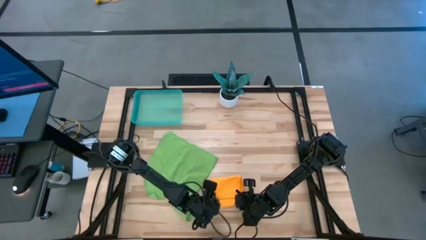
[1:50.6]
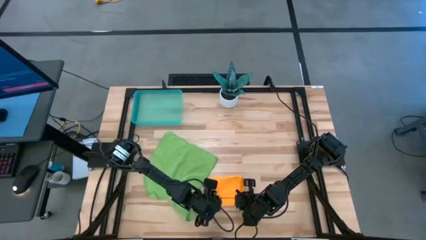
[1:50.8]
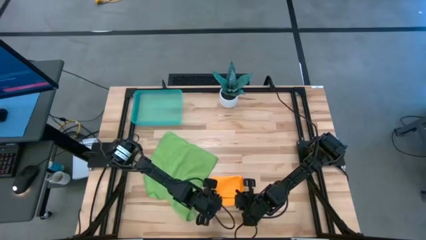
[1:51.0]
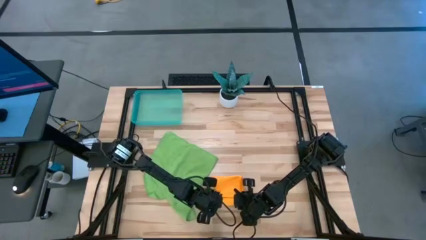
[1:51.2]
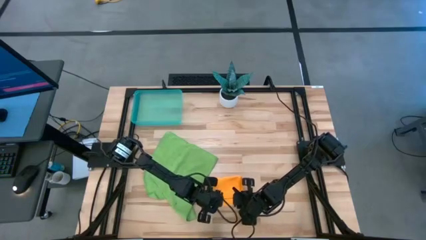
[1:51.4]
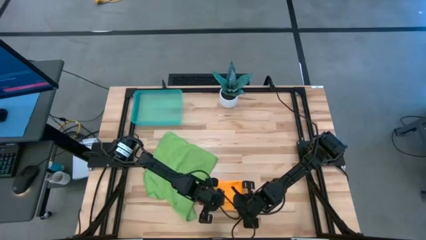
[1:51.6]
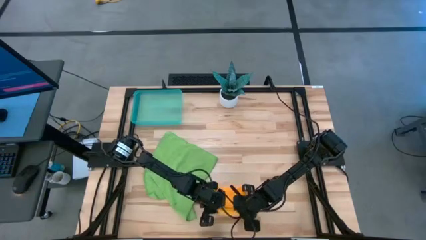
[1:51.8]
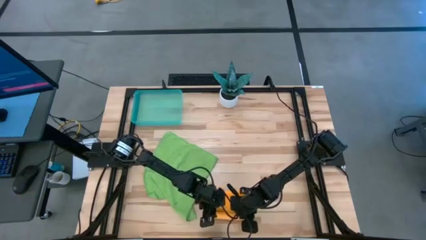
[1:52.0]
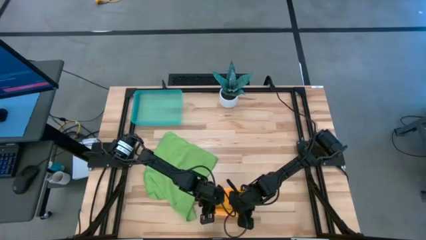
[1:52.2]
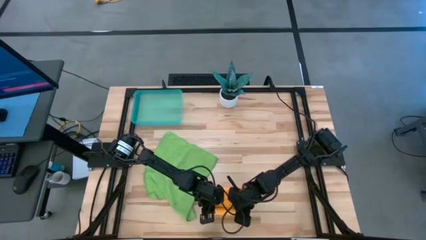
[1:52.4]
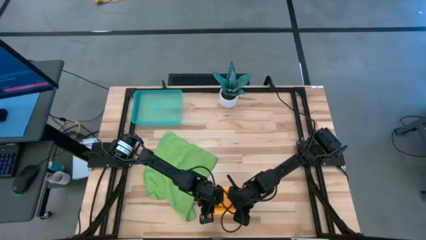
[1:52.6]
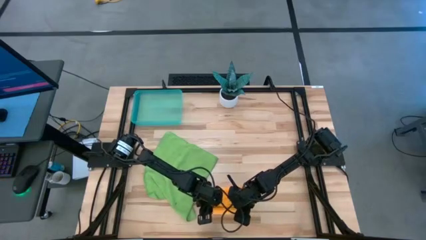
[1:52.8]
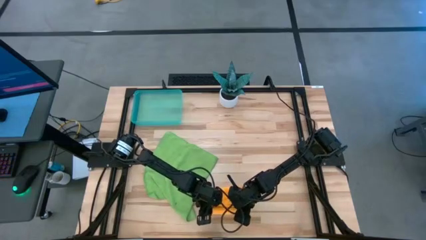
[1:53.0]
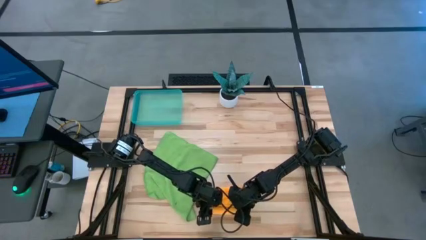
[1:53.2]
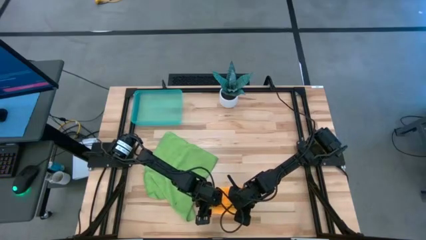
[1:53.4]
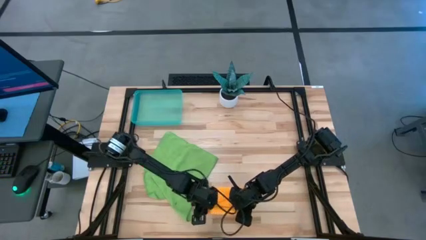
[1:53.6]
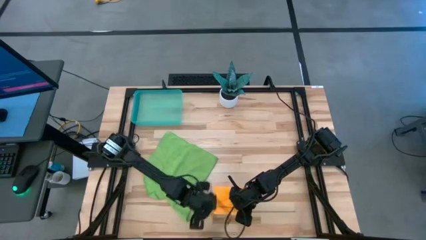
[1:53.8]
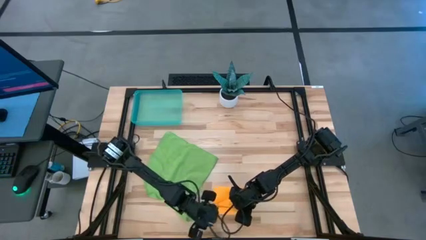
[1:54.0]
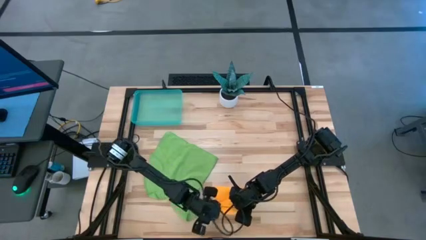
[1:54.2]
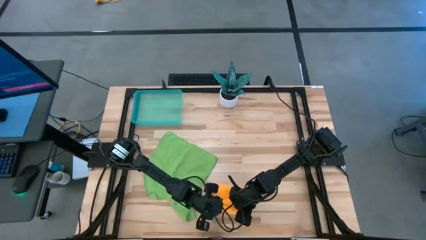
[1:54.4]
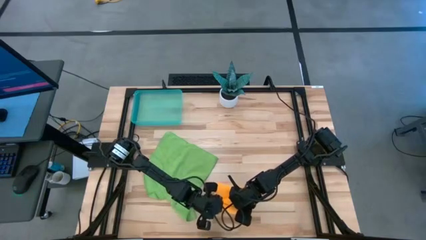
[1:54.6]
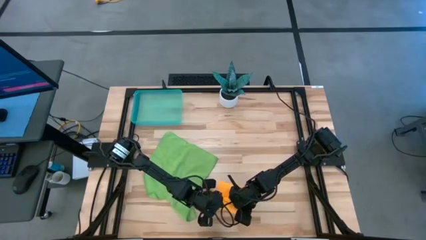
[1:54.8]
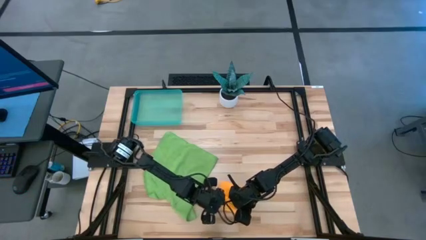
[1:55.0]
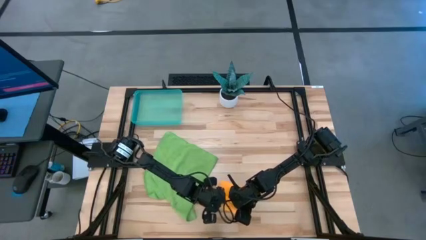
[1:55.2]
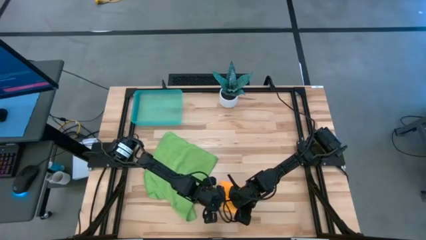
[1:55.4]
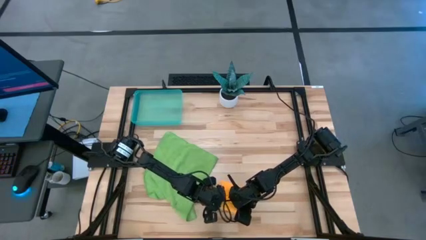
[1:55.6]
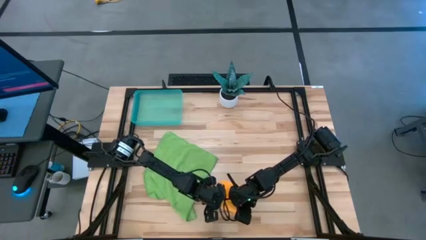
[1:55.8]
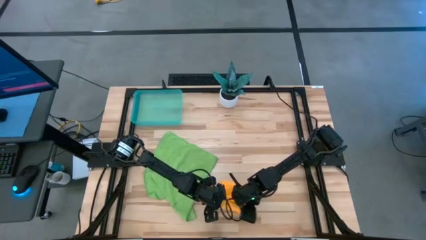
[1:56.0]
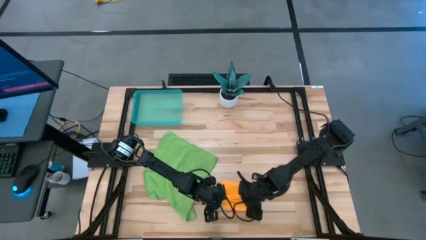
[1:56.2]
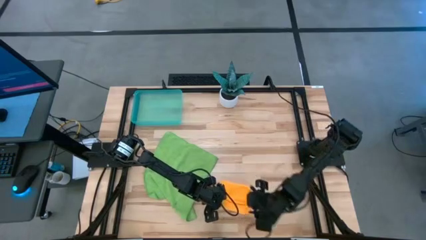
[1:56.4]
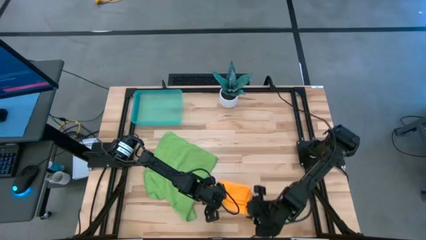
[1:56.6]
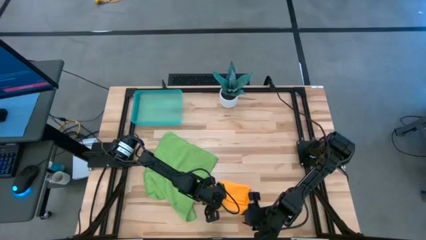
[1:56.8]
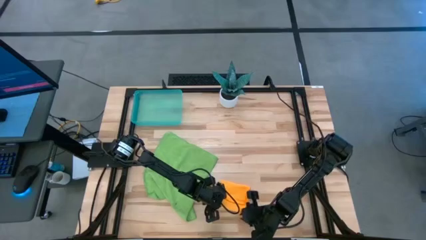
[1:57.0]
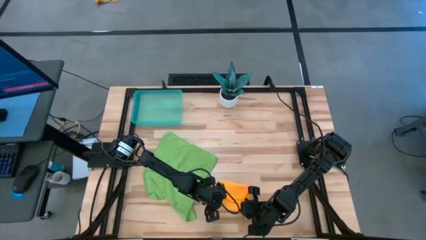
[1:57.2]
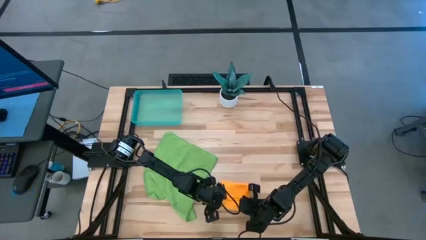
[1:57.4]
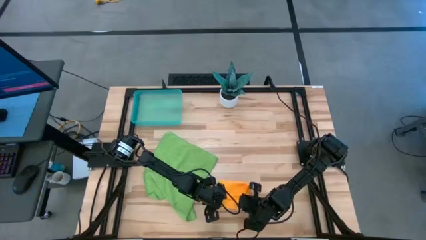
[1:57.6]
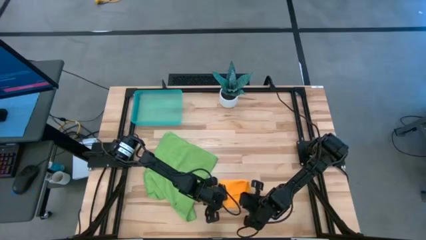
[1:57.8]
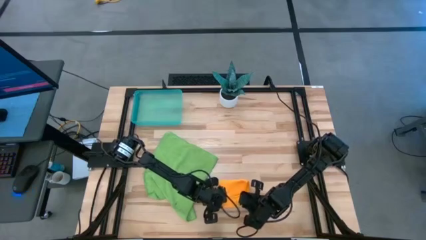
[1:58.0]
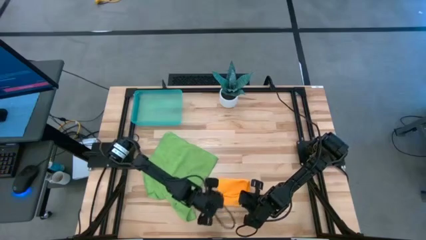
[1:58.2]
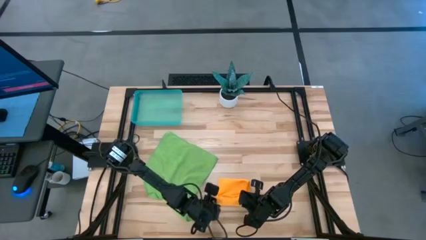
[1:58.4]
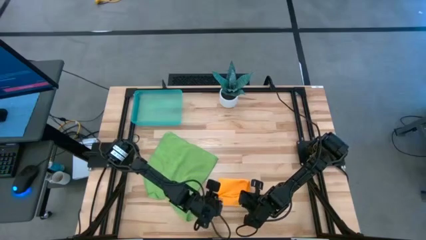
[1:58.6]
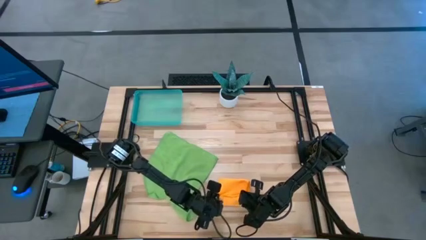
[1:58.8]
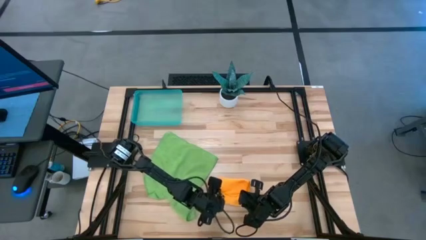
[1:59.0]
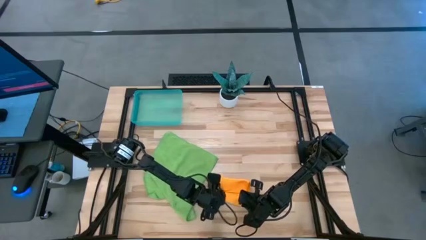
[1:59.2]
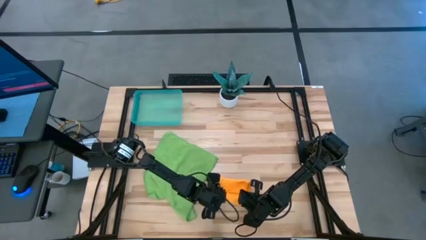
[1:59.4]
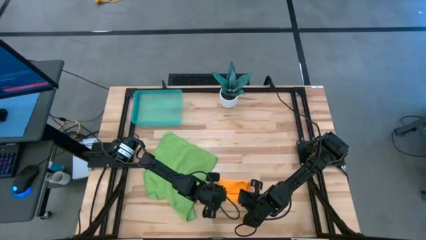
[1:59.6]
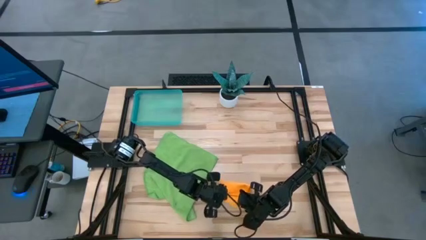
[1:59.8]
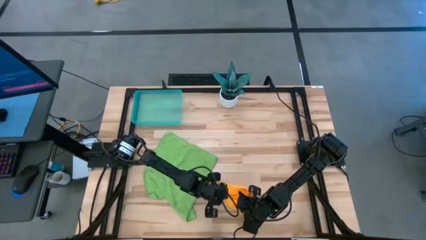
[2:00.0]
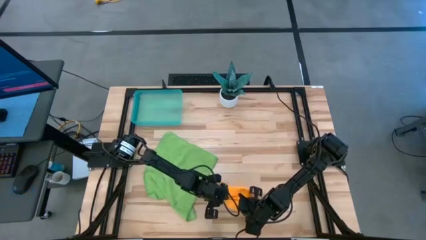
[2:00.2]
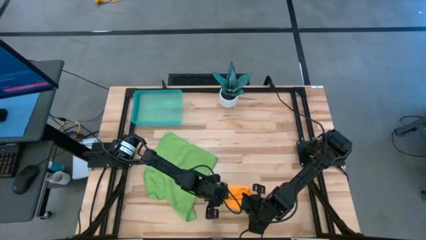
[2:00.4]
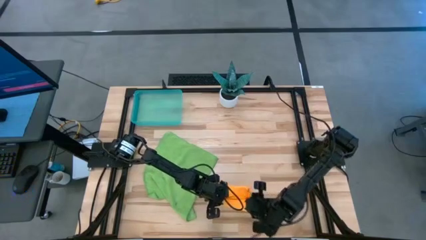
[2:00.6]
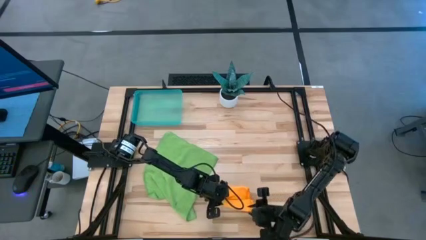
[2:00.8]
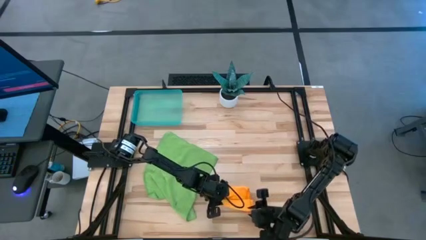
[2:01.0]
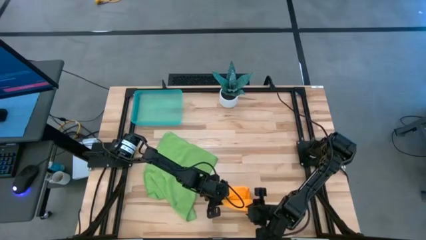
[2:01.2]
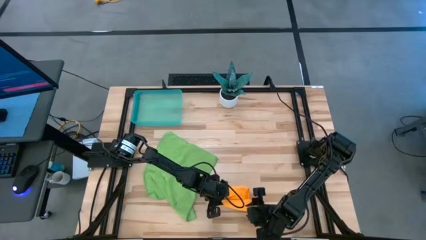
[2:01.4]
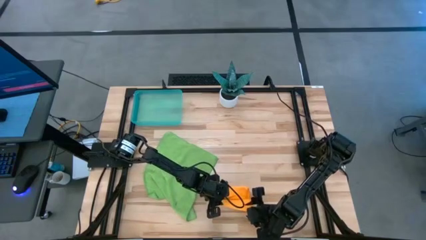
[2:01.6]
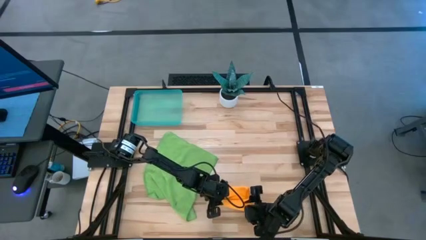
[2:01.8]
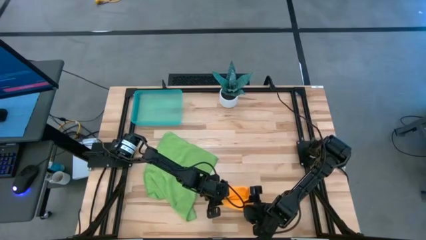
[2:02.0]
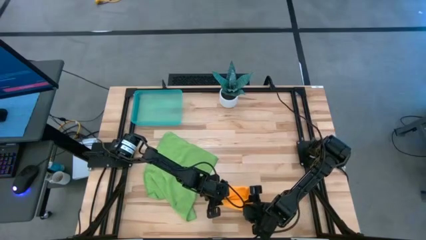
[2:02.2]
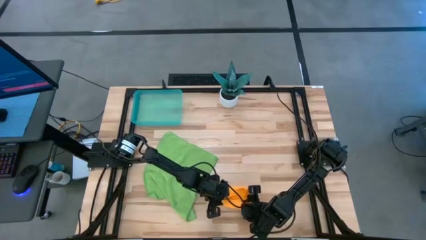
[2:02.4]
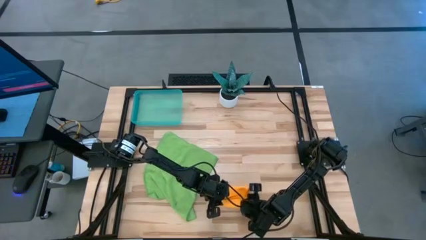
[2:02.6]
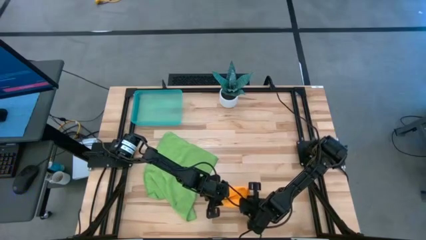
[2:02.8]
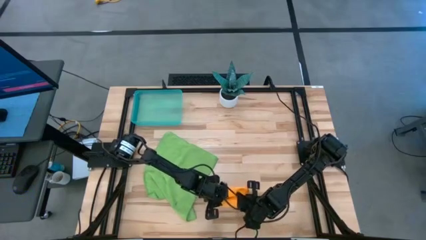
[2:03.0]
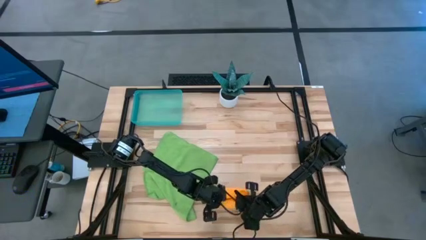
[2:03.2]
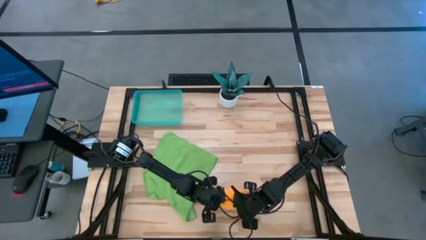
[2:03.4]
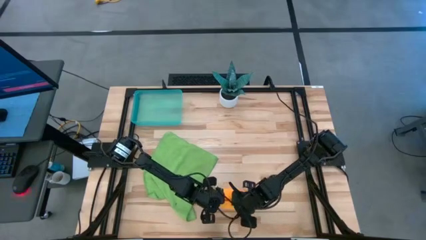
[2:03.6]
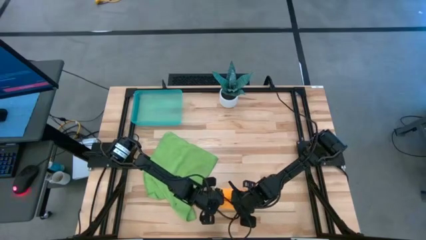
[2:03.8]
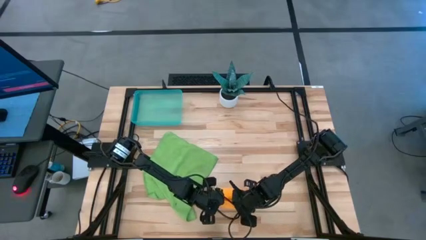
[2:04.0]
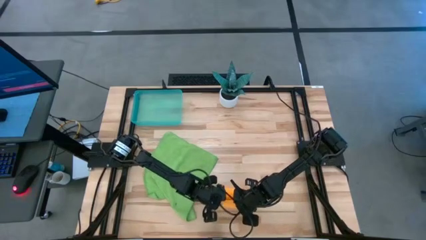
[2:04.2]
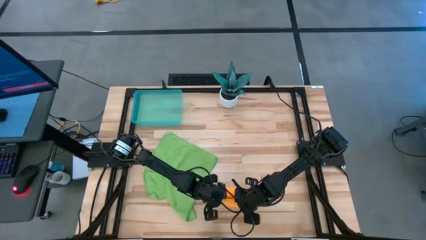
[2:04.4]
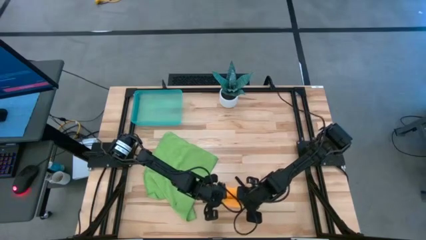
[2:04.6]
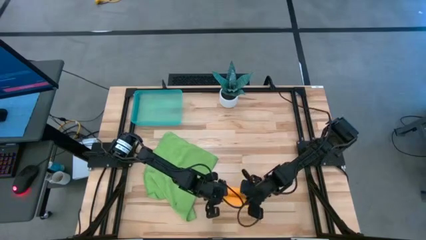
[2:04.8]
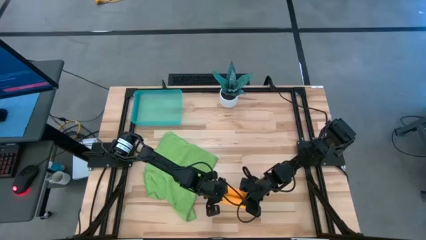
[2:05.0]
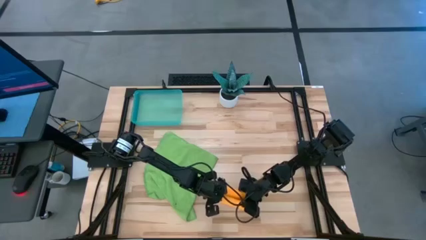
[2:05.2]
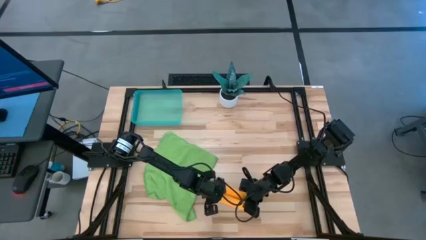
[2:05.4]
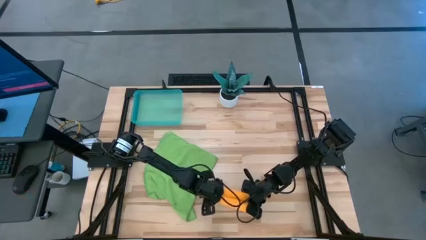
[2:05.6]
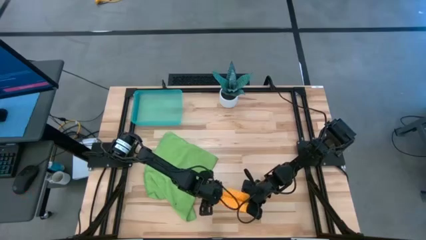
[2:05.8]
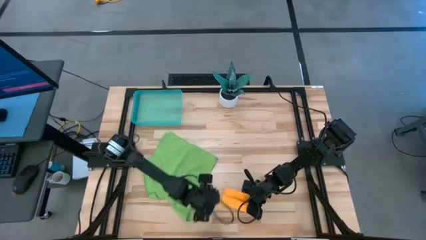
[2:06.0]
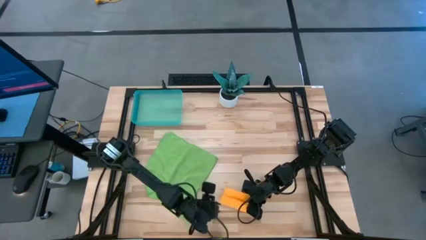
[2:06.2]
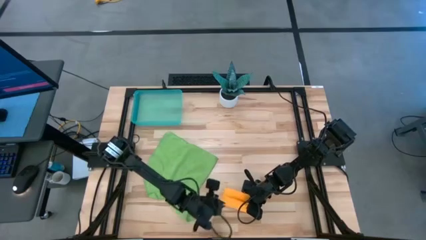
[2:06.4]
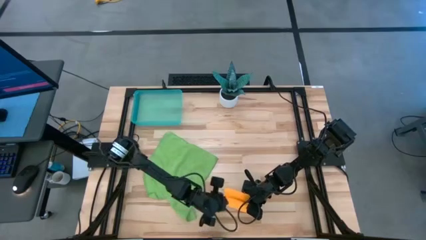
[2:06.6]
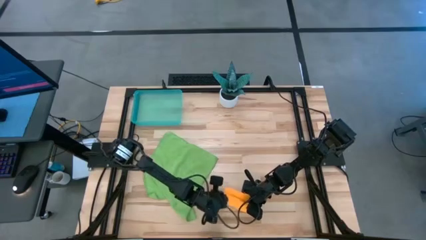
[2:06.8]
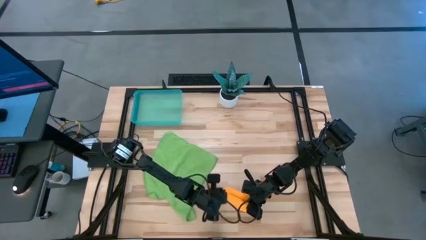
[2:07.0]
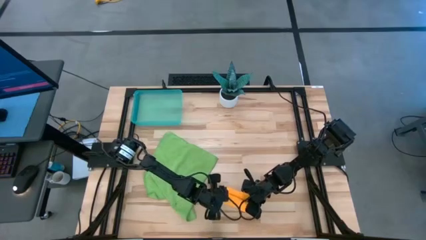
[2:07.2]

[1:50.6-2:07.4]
Task: Roll microfiber towels into tight, uniform cylinder then place into a basket
Roll the yellow microfiber cloth
